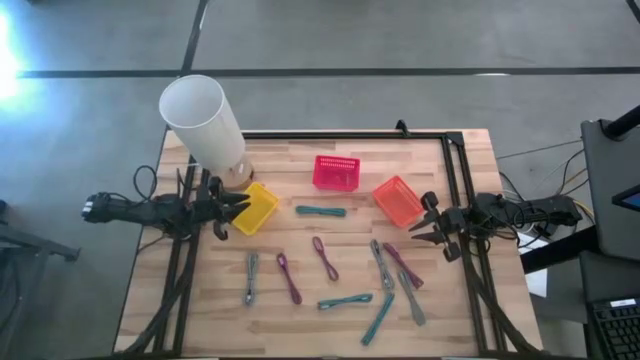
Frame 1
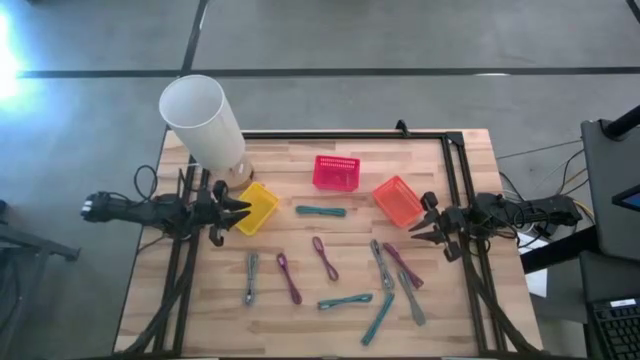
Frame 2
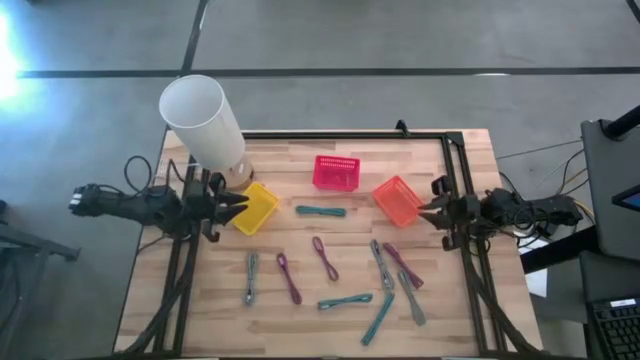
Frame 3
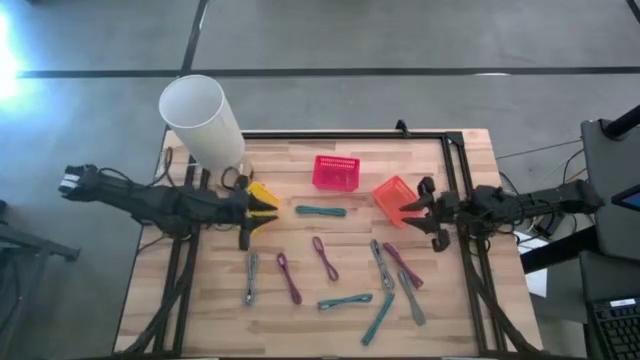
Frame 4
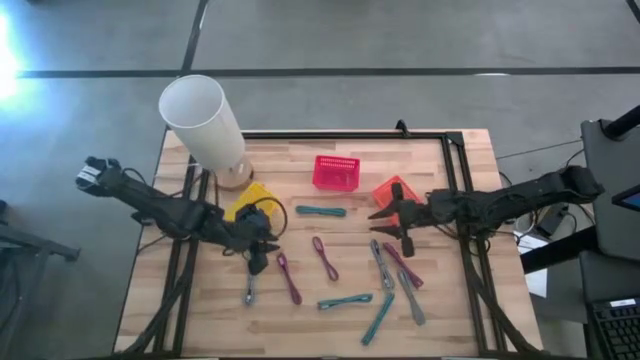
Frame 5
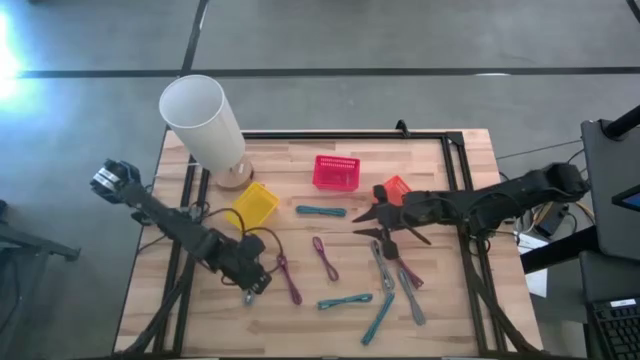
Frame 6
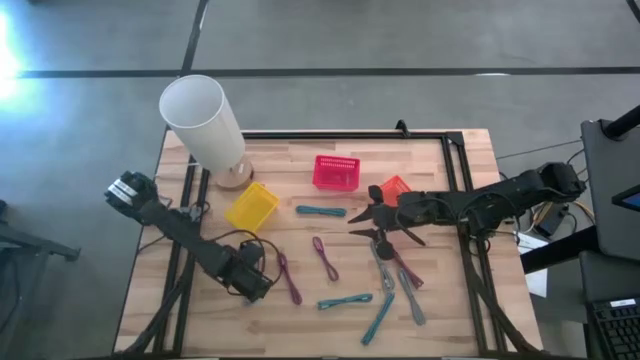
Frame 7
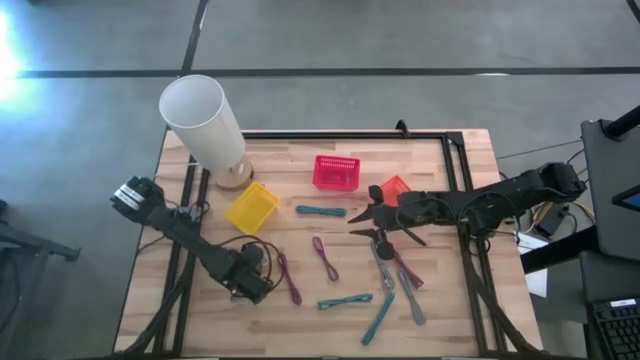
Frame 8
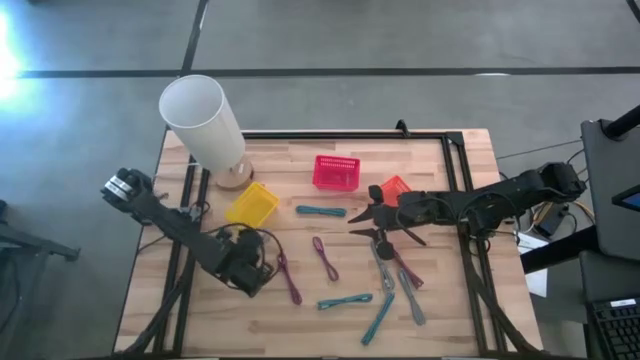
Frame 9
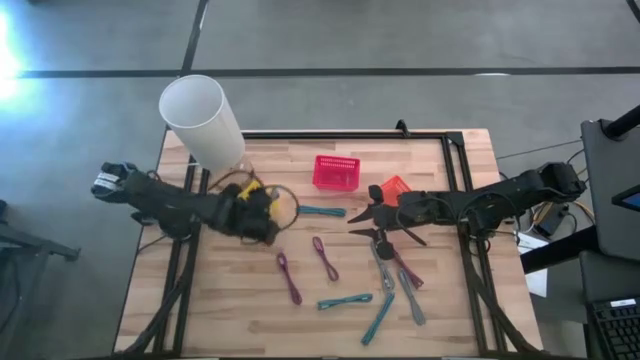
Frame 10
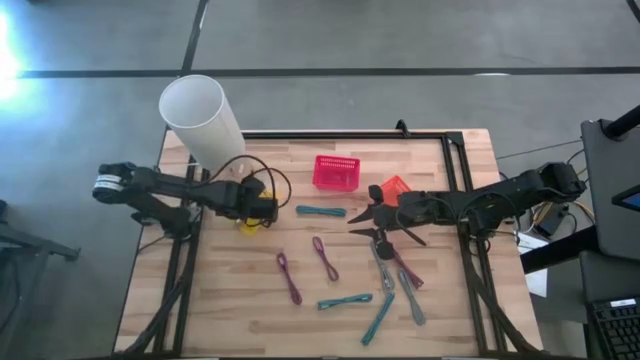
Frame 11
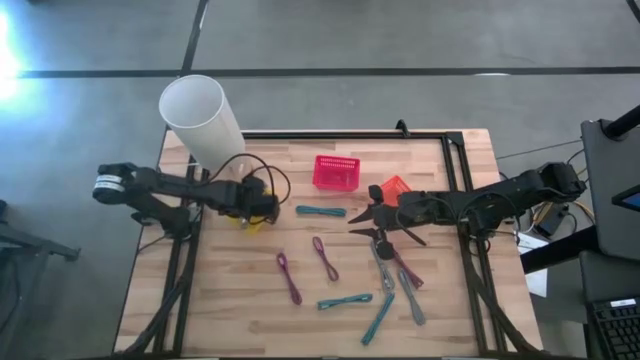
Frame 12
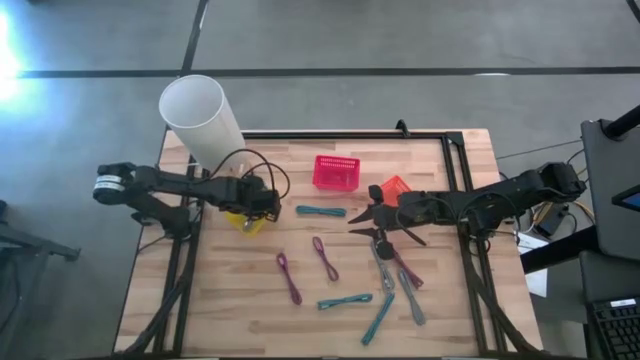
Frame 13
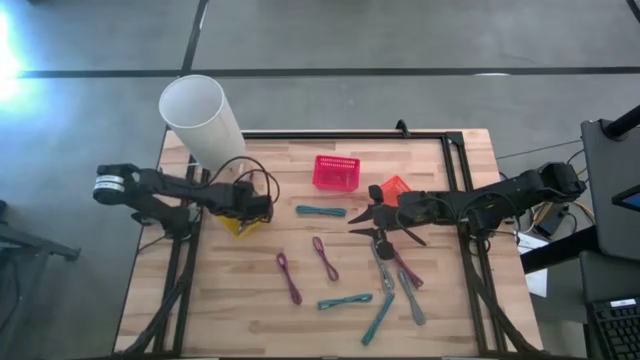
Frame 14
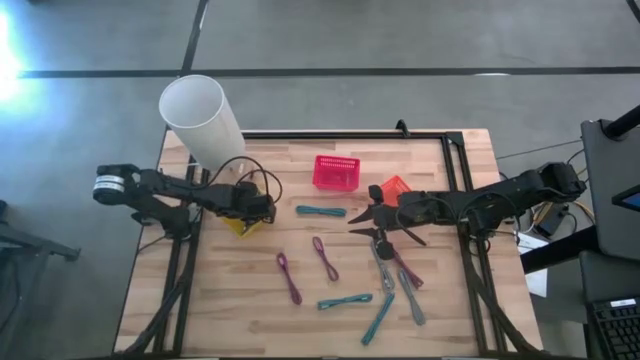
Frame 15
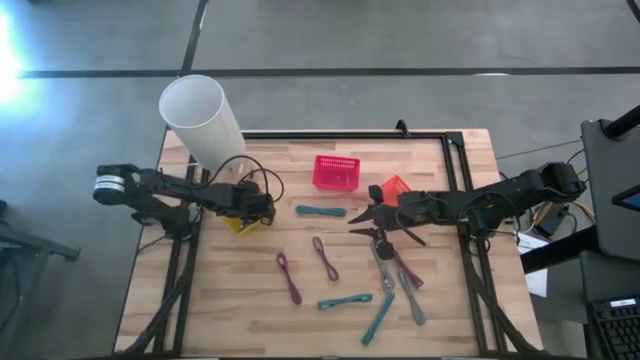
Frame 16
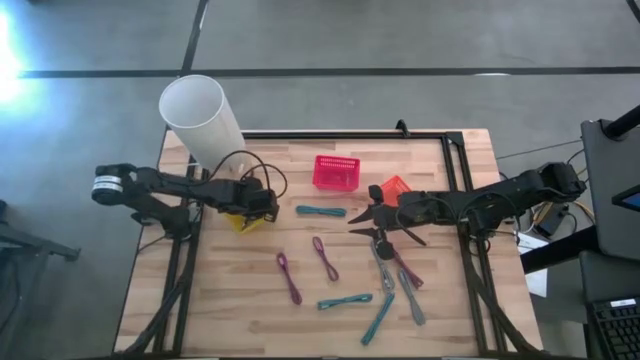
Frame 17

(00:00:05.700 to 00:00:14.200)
Task: Pick & Place USB Port
Put the top left black charger cable into the yellow bin

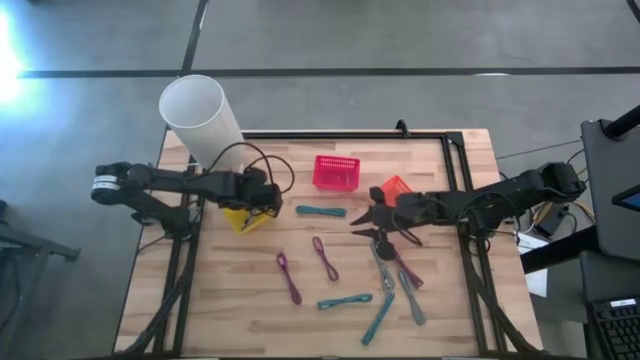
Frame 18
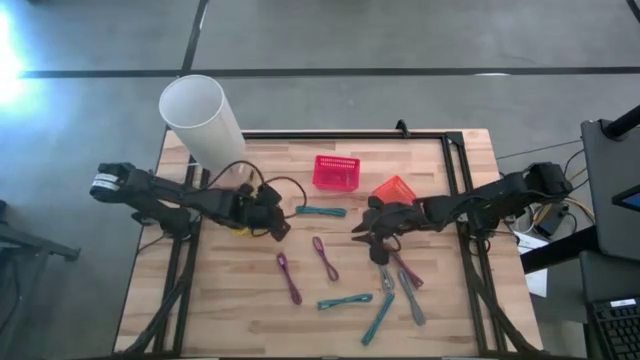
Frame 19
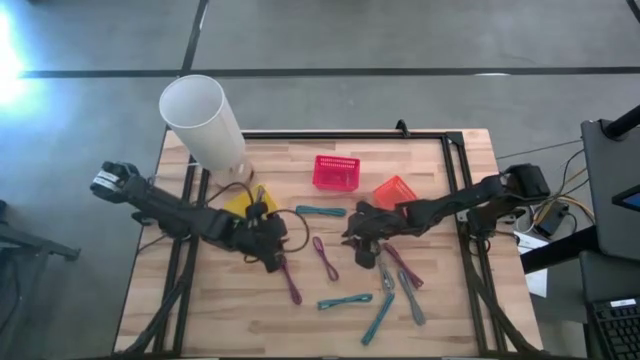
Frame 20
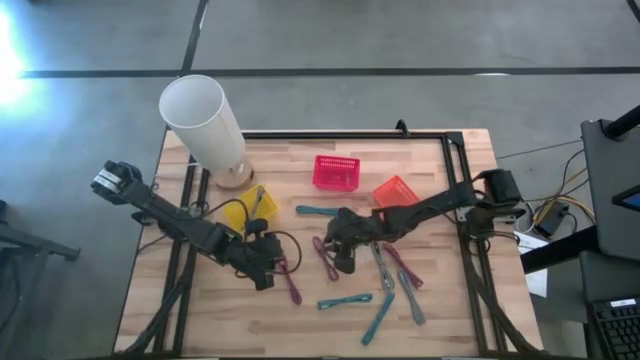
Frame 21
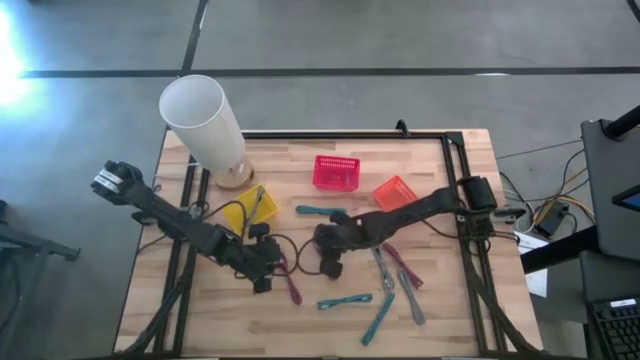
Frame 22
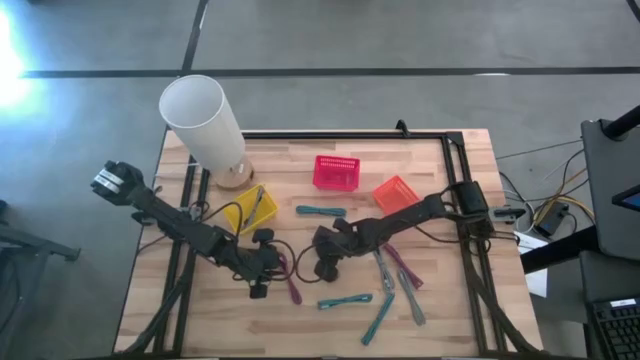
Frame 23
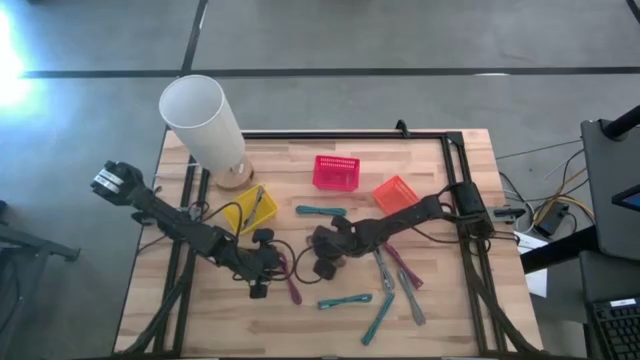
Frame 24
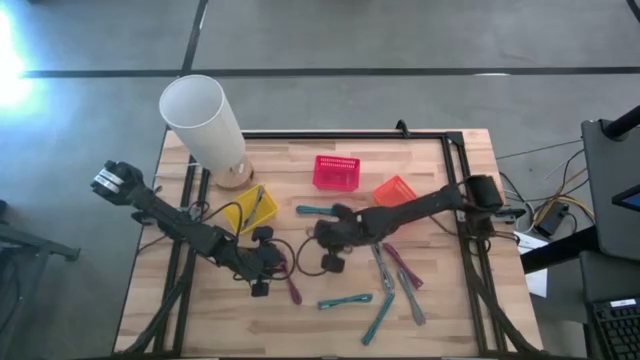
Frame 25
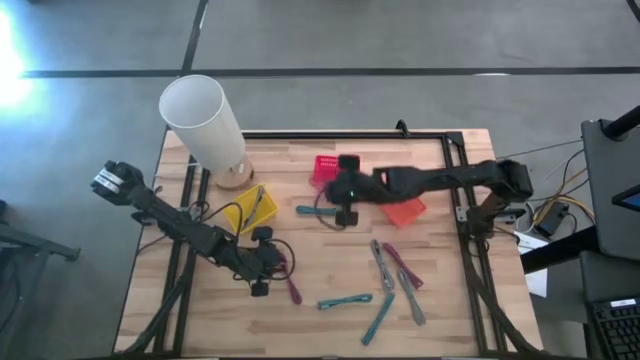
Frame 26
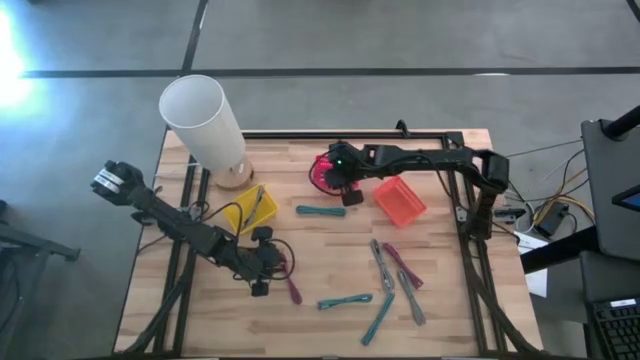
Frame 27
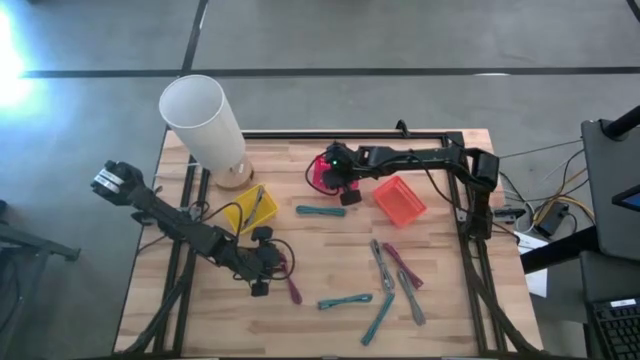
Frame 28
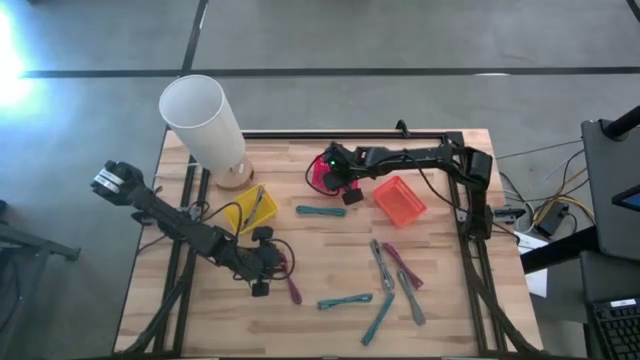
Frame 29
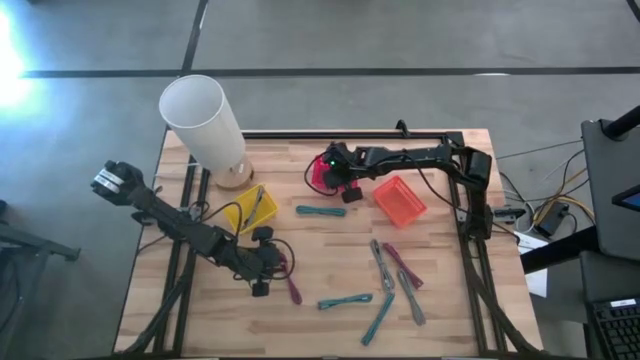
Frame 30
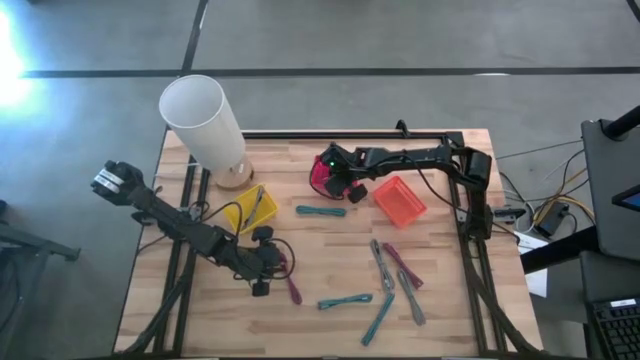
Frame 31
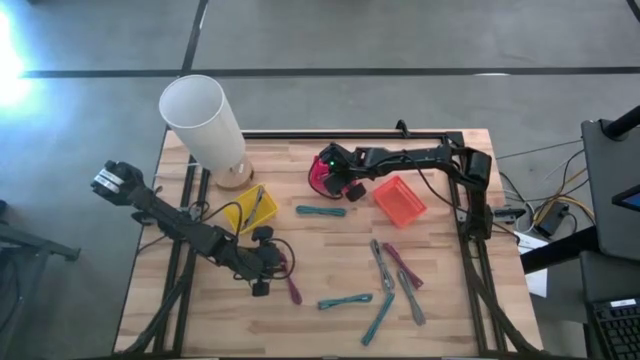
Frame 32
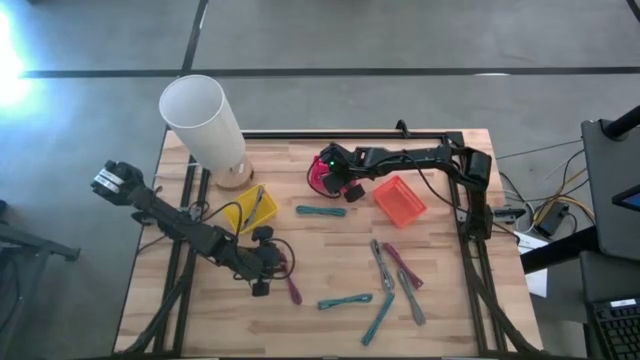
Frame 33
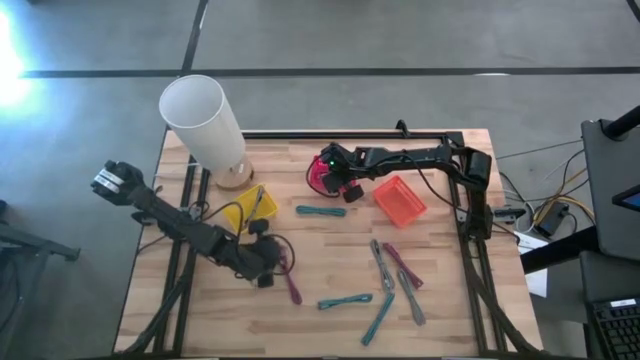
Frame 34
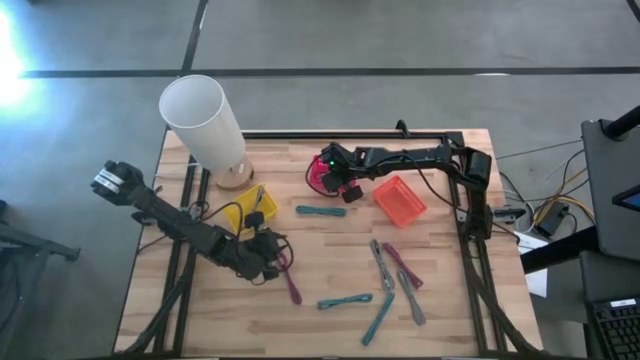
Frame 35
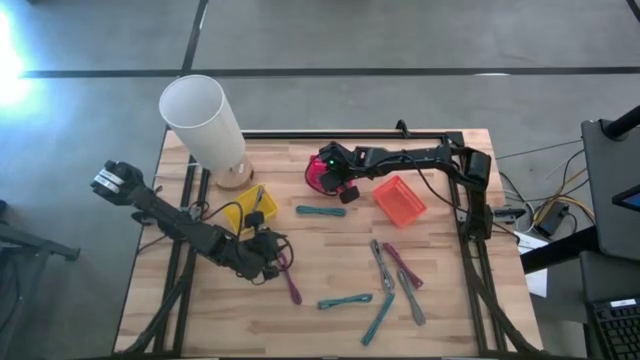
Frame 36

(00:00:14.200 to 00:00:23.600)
Put the middle pink charger cable into the red bin

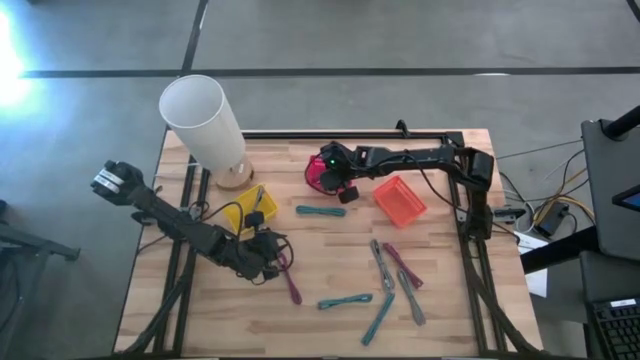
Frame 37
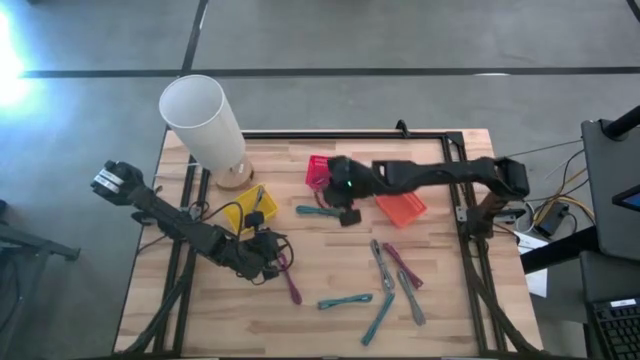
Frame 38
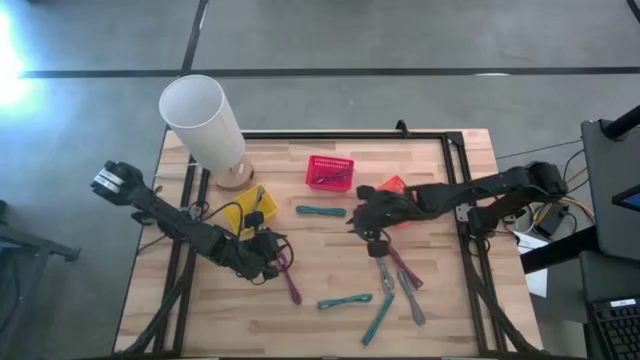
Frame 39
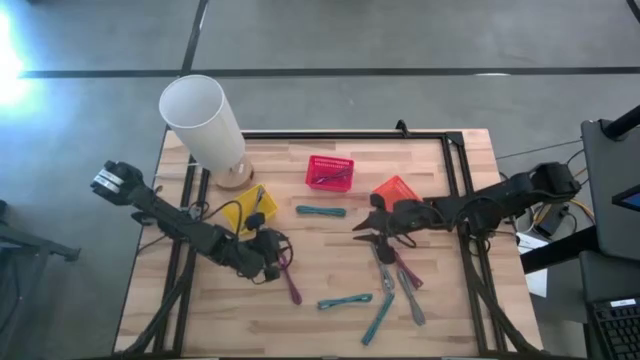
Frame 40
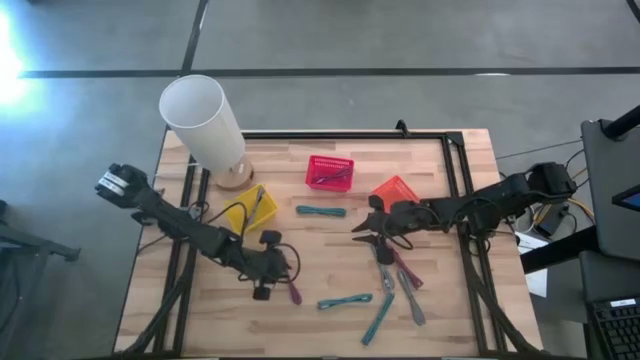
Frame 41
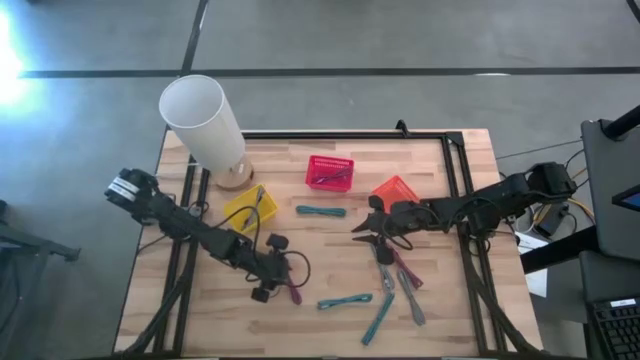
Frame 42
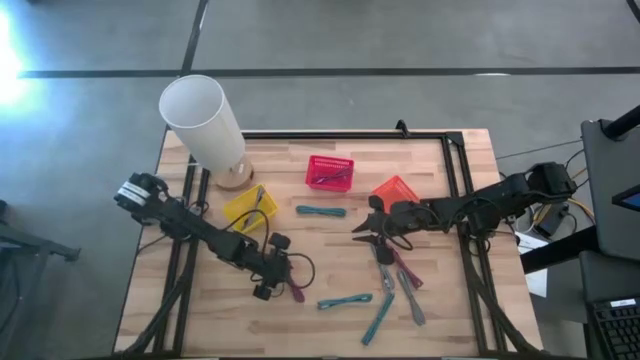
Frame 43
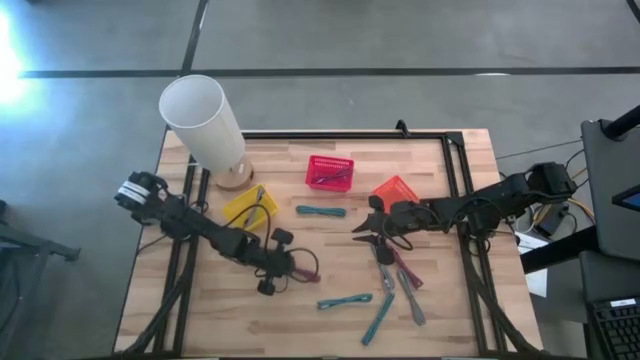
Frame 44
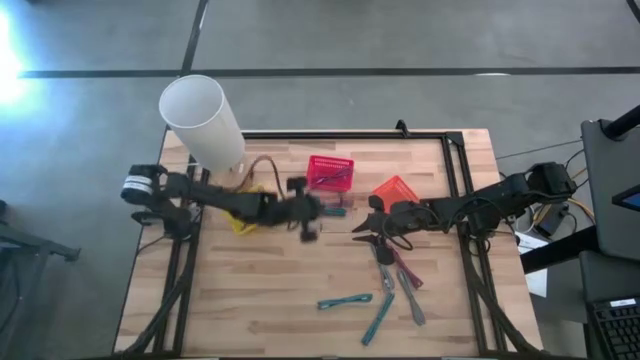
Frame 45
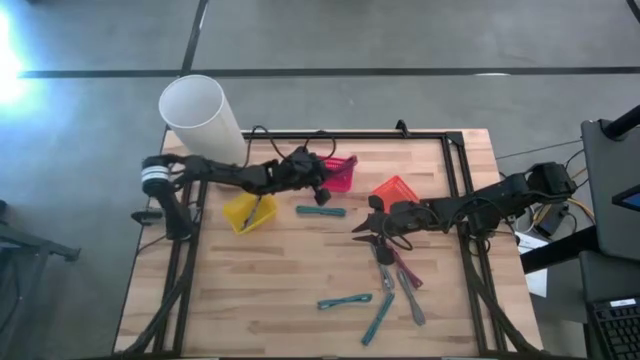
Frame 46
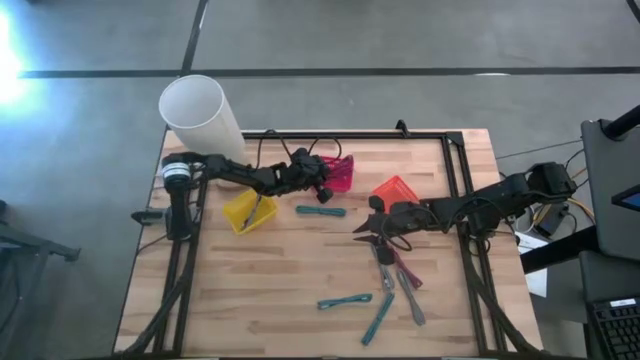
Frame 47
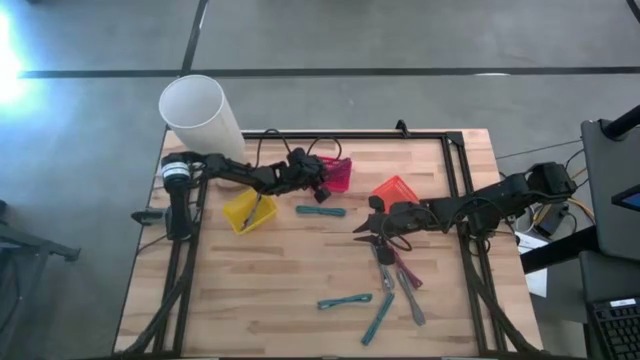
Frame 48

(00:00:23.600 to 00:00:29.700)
Put the left pink charger cable into the red bin
